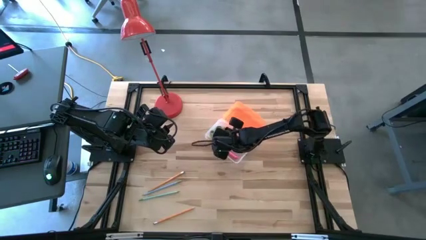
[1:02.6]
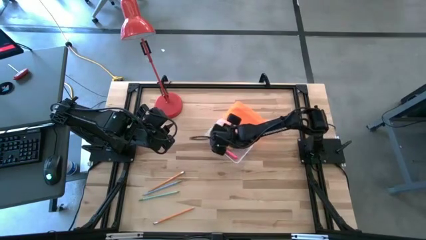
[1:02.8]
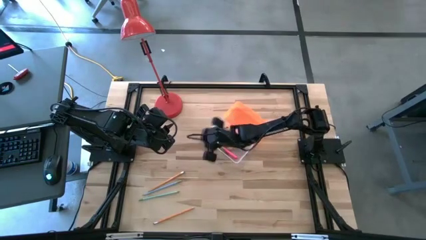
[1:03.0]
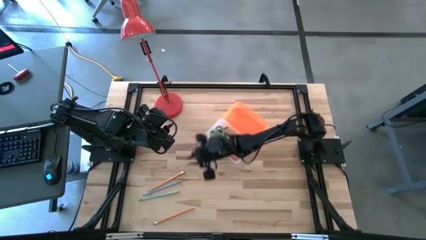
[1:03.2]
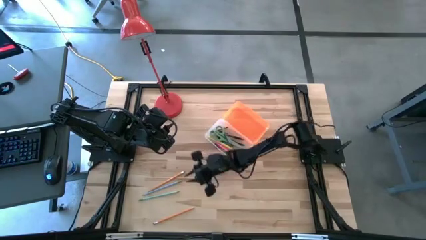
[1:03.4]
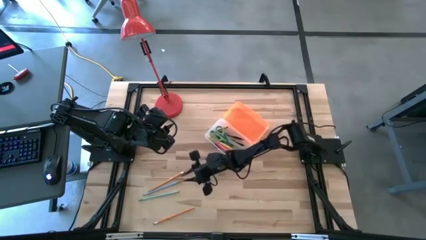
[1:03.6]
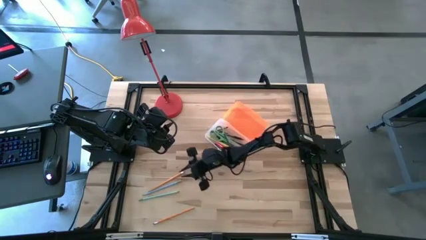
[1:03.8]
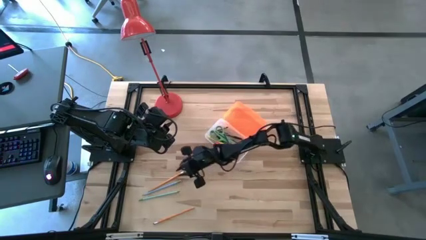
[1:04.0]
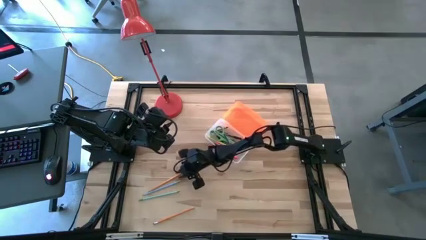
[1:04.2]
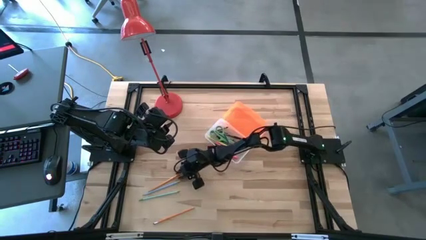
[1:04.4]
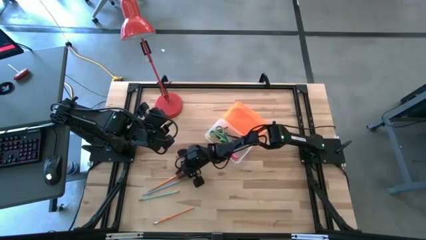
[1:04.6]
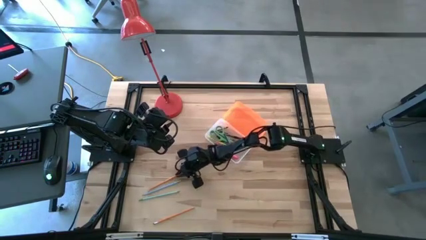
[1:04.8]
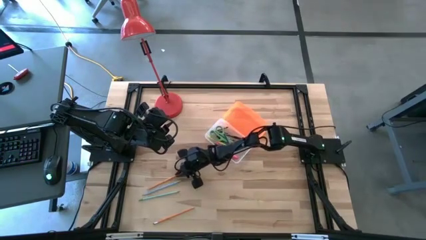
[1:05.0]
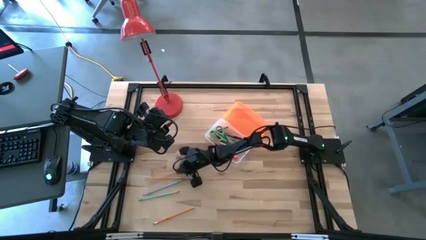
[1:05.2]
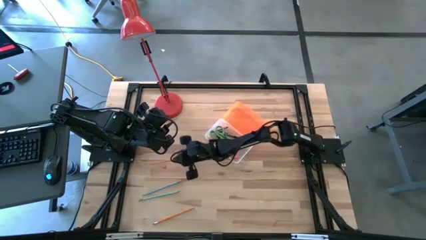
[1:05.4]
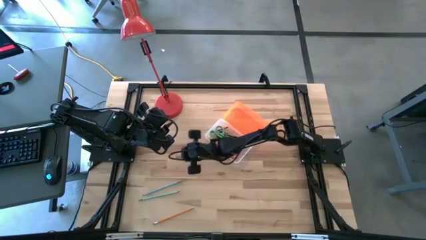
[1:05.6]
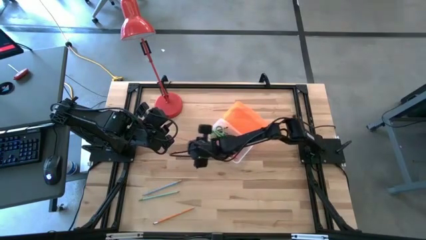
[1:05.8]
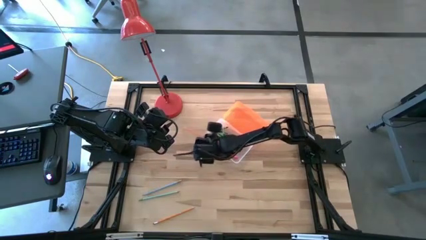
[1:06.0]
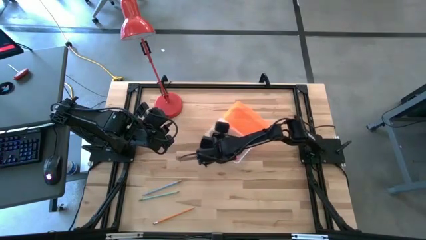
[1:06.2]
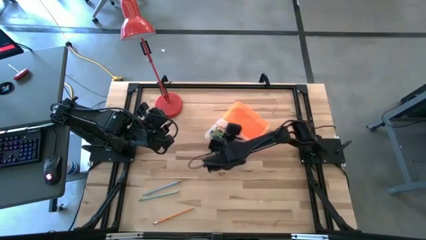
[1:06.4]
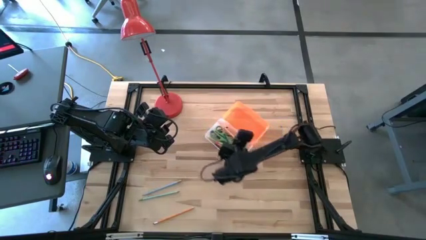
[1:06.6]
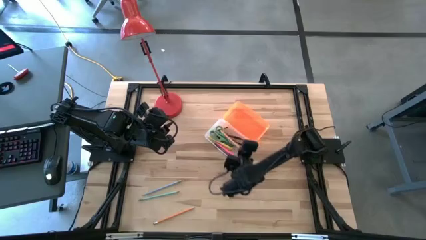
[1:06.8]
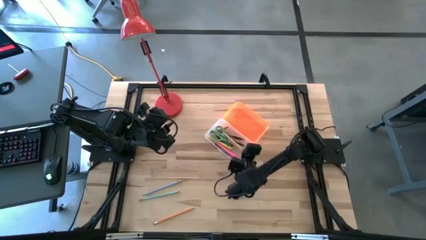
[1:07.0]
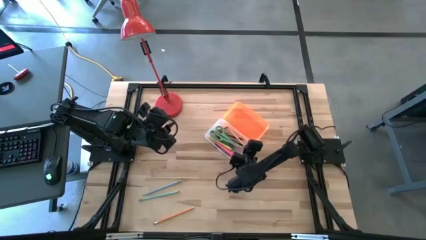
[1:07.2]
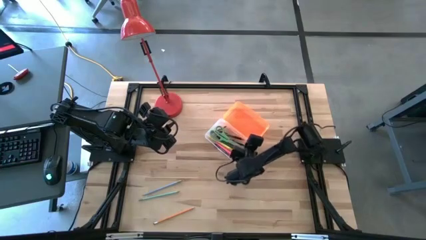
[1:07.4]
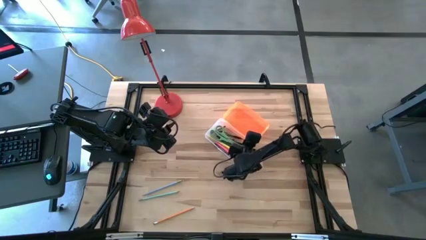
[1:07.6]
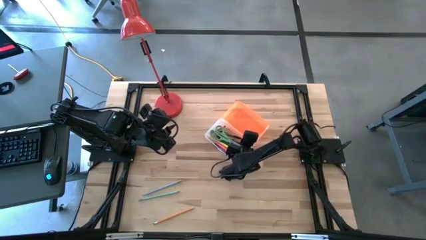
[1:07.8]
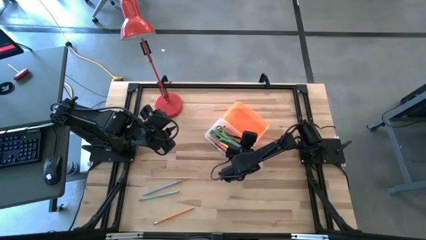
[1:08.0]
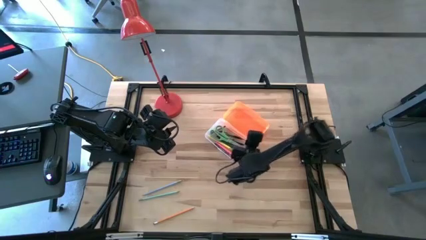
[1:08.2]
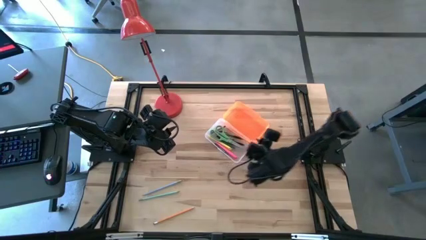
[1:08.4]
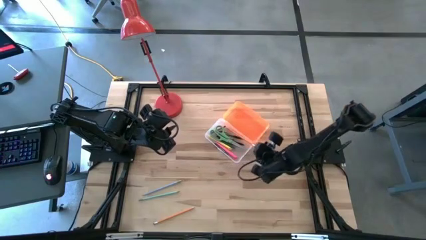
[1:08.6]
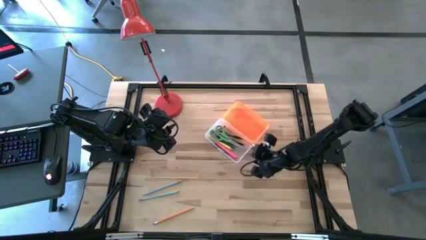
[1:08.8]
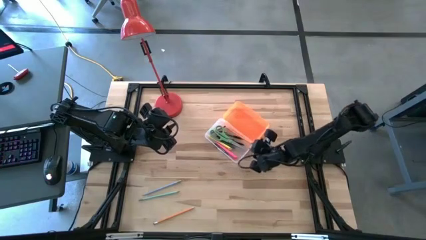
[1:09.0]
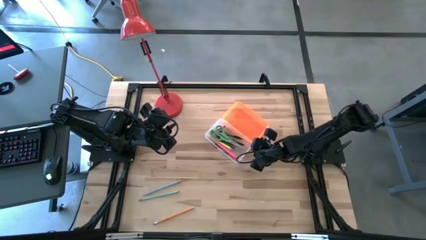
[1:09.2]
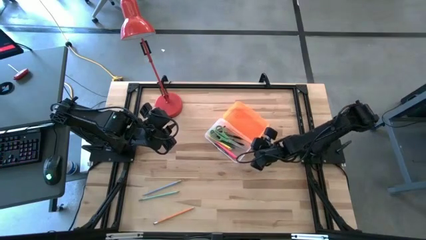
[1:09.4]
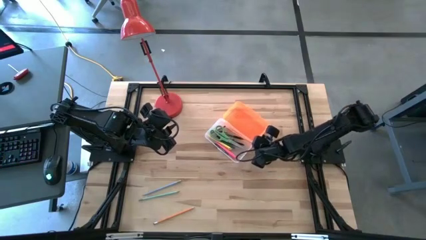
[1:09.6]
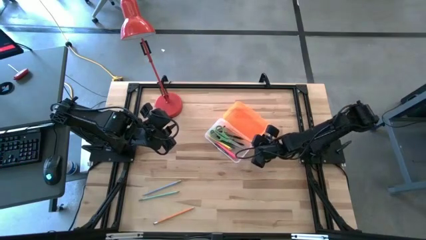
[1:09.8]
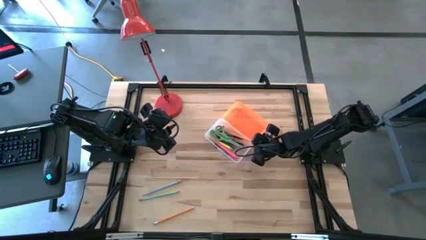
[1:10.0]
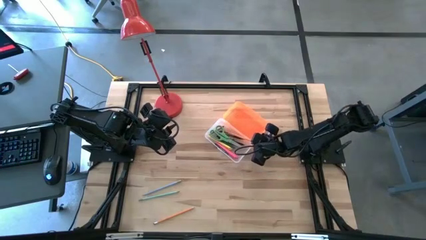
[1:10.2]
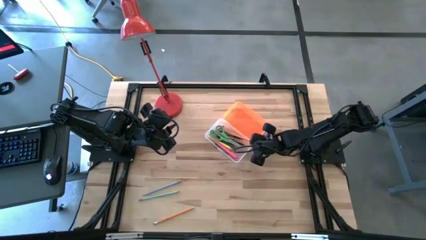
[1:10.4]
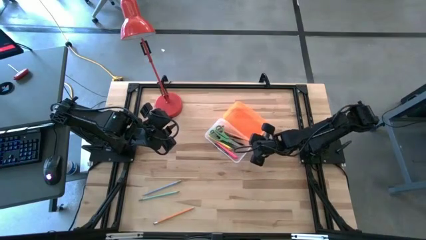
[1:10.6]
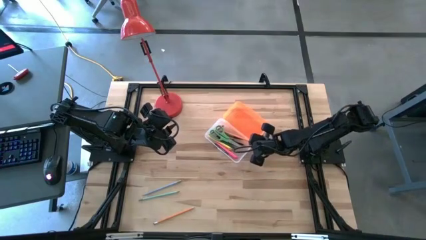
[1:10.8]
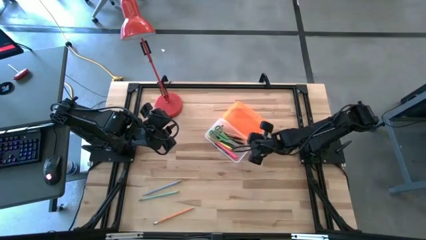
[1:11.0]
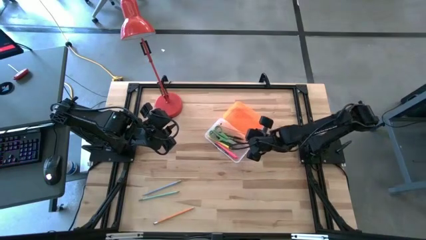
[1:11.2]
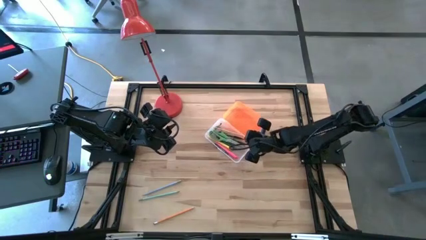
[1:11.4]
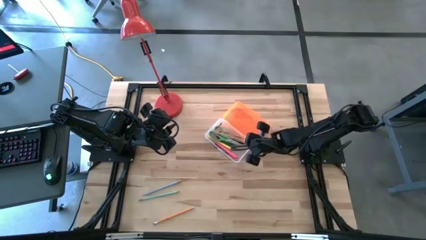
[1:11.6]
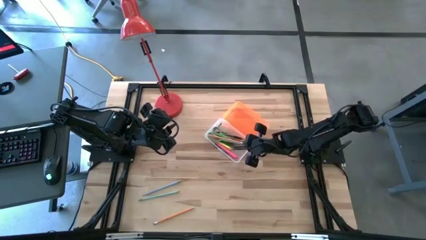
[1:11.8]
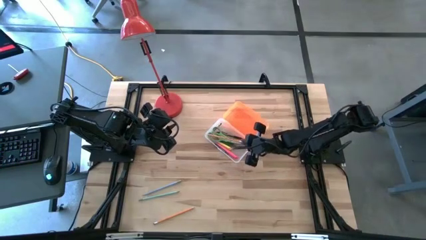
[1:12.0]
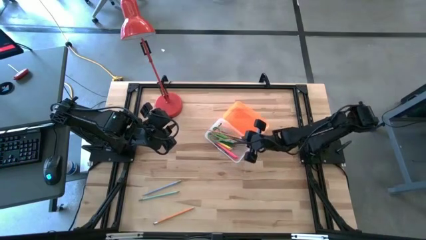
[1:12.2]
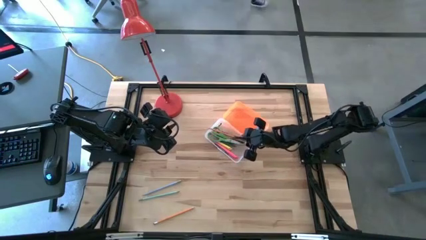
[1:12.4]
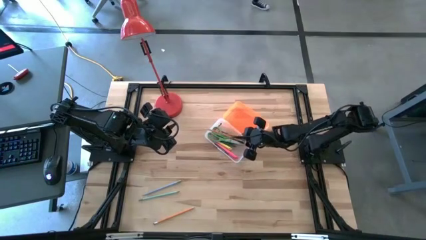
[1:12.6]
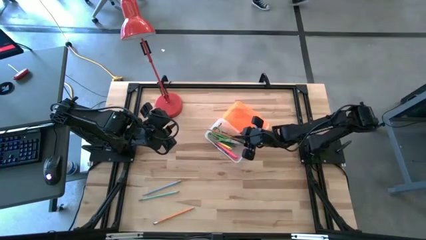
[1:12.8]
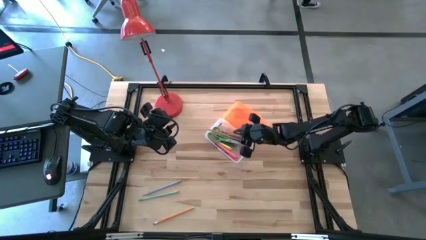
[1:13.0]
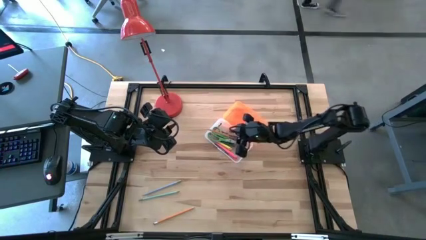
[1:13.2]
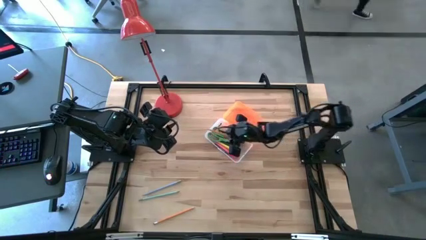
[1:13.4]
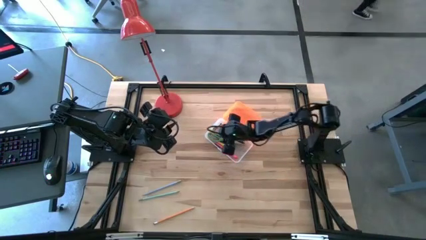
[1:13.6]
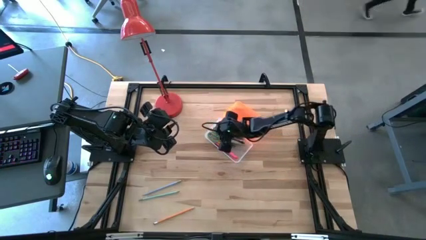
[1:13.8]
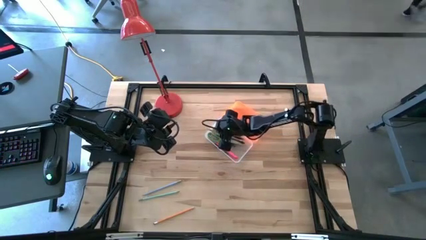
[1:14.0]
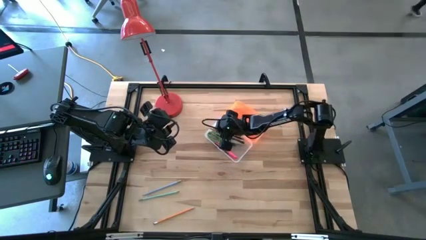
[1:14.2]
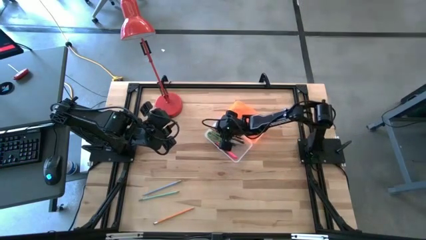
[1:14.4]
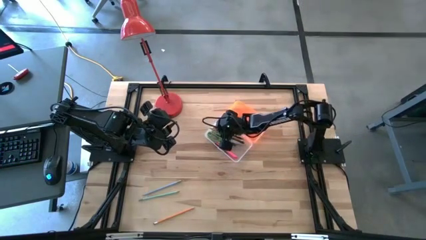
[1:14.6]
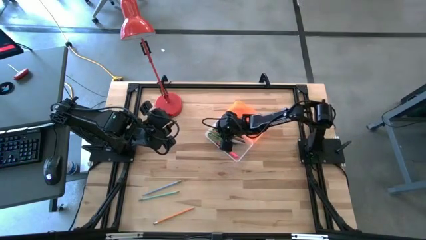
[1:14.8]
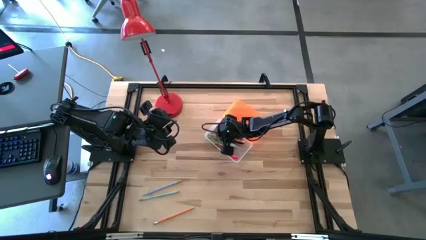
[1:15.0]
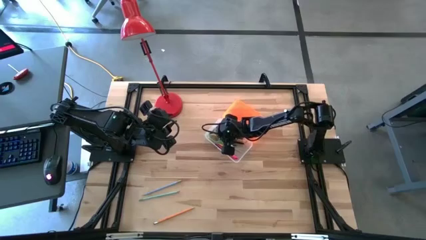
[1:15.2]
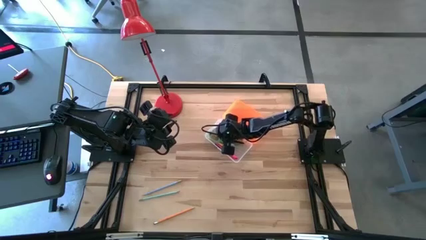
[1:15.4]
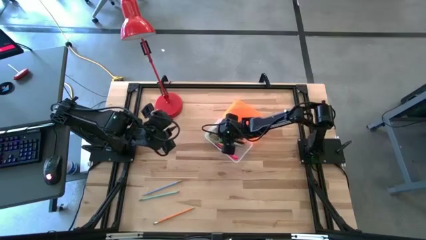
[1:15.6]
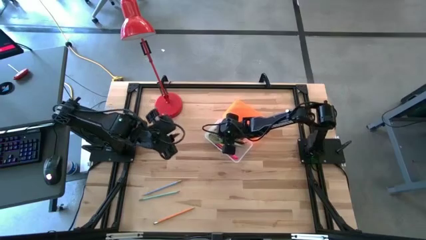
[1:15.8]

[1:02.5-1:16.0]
Task: Pick & place school supplies into a supply box
Put the top orange pencil into the supply box
